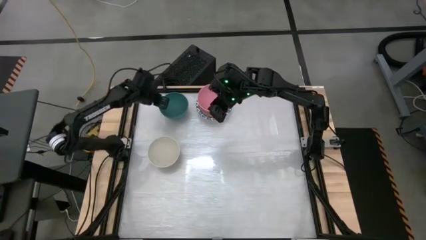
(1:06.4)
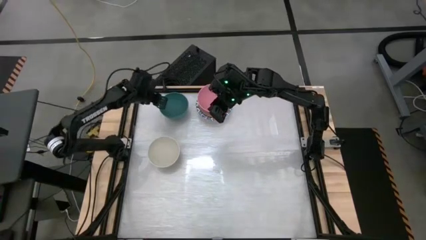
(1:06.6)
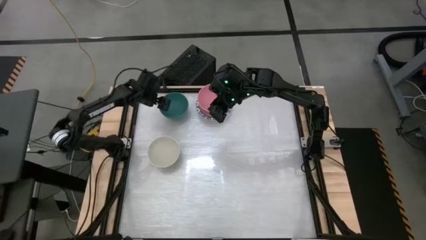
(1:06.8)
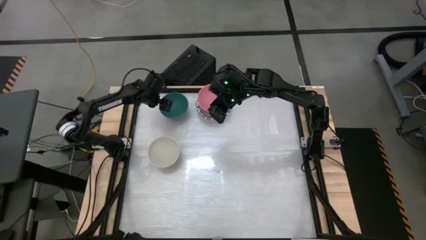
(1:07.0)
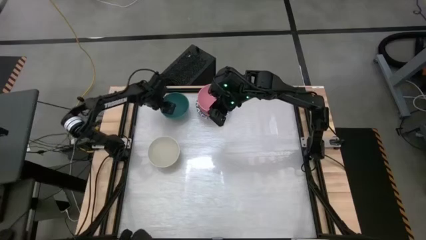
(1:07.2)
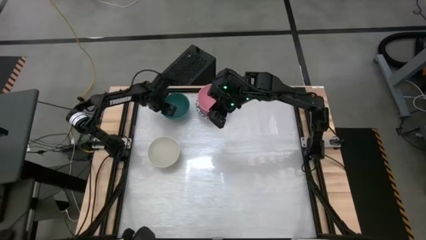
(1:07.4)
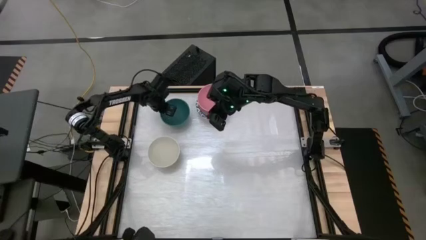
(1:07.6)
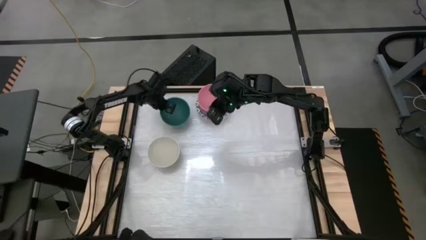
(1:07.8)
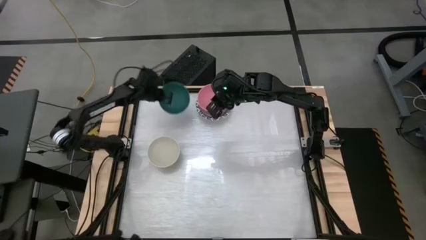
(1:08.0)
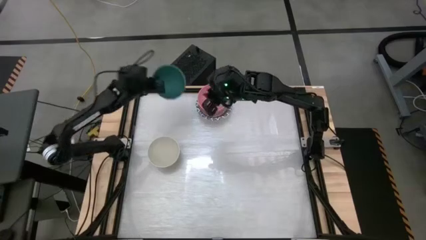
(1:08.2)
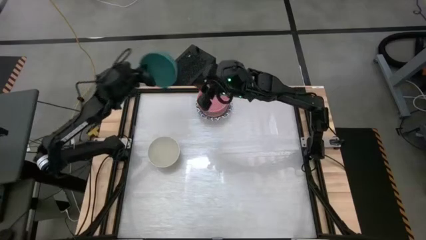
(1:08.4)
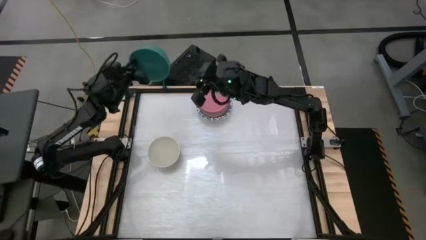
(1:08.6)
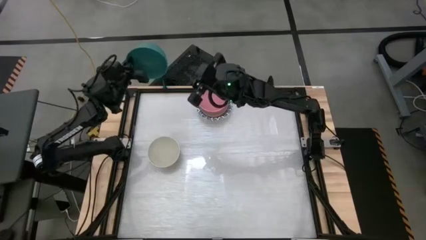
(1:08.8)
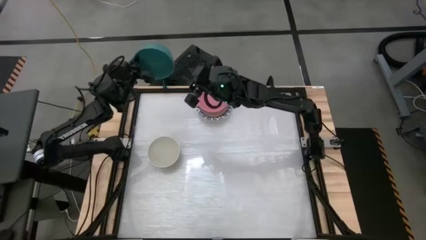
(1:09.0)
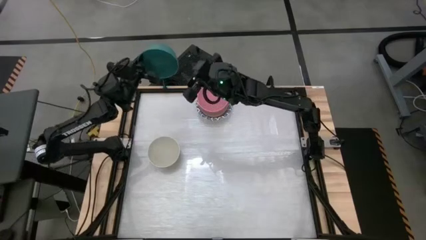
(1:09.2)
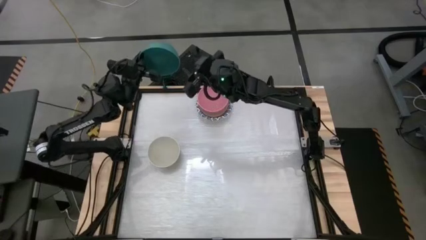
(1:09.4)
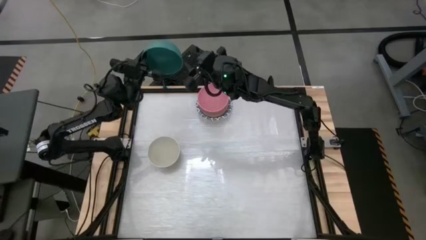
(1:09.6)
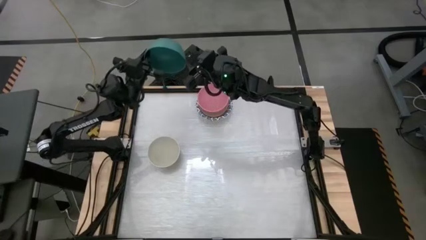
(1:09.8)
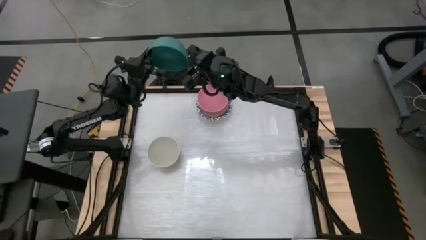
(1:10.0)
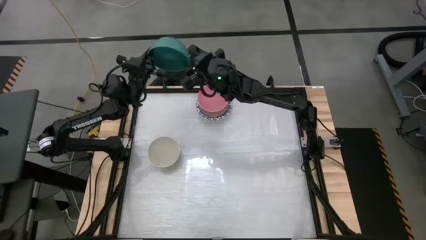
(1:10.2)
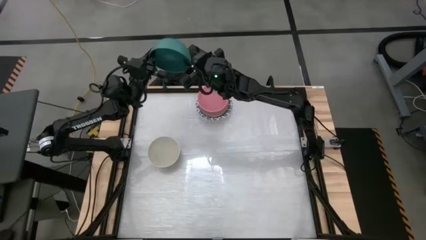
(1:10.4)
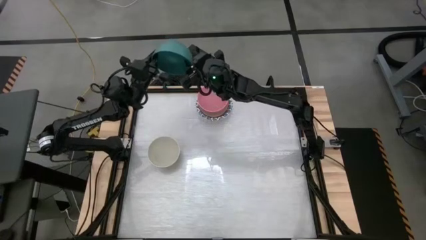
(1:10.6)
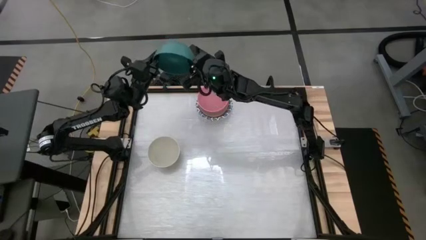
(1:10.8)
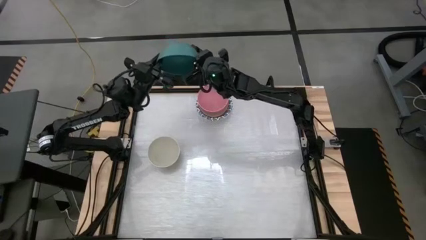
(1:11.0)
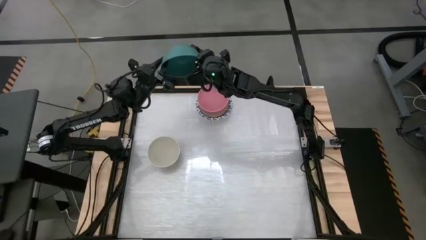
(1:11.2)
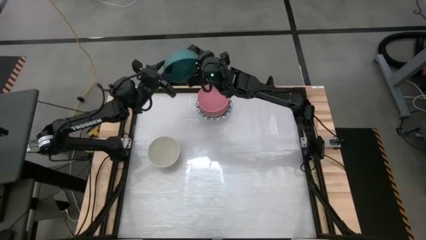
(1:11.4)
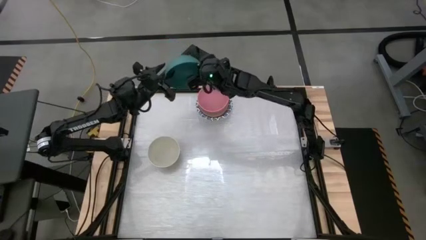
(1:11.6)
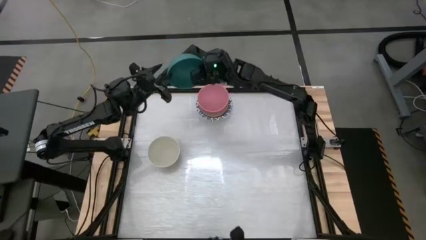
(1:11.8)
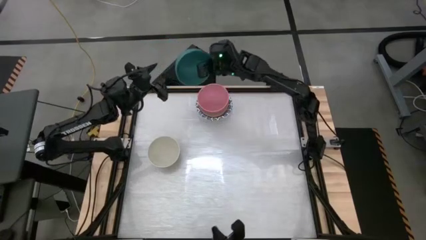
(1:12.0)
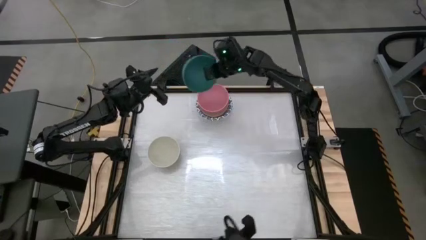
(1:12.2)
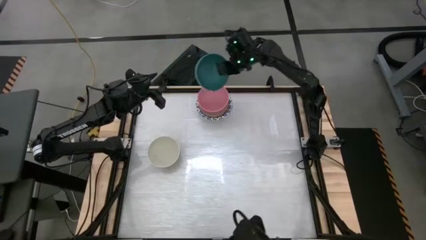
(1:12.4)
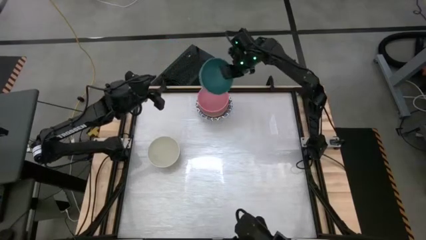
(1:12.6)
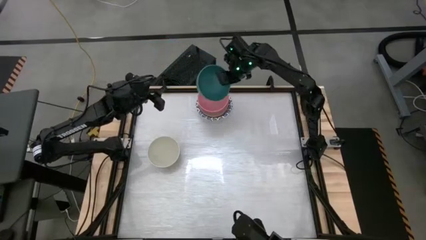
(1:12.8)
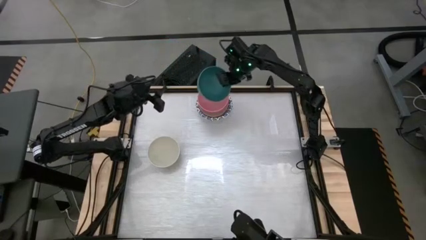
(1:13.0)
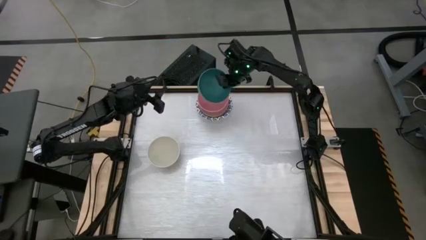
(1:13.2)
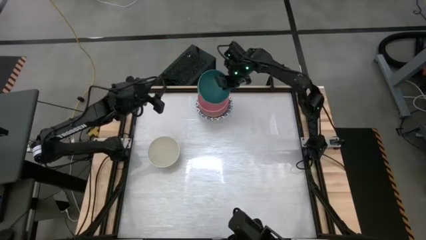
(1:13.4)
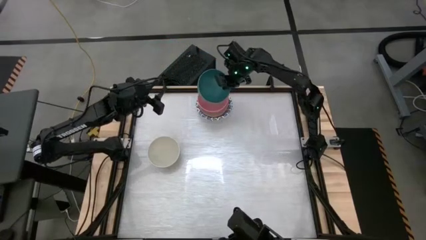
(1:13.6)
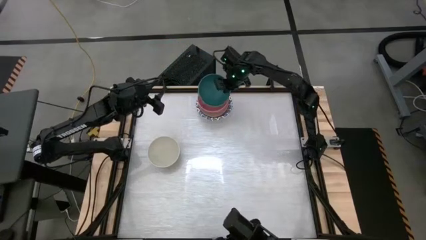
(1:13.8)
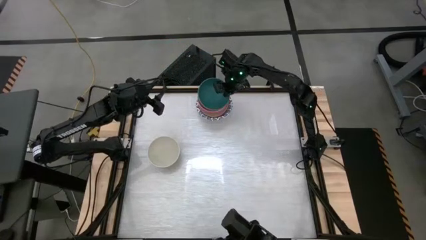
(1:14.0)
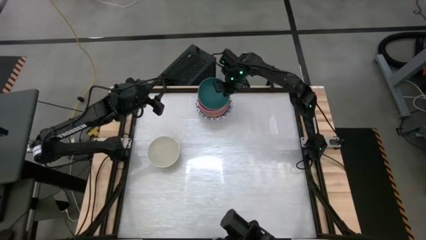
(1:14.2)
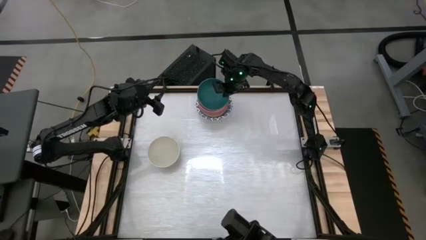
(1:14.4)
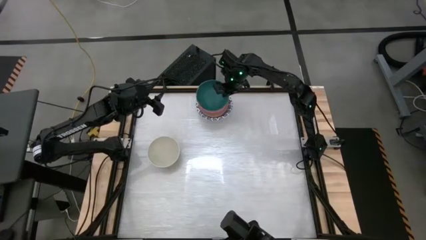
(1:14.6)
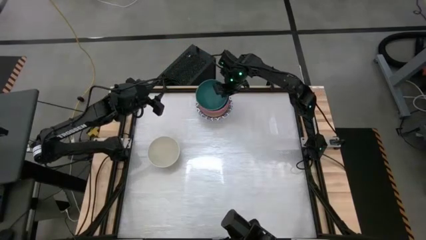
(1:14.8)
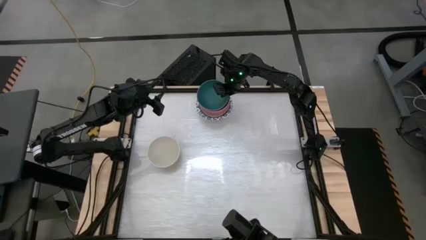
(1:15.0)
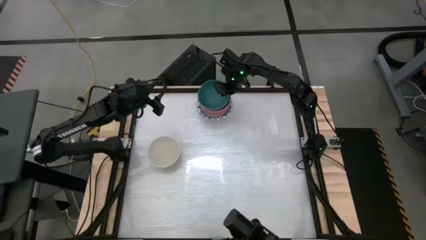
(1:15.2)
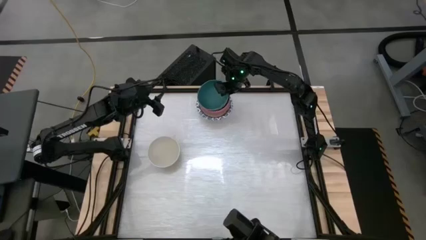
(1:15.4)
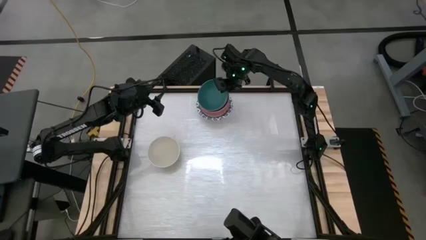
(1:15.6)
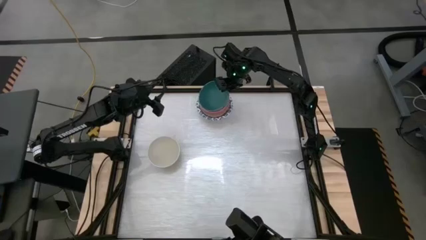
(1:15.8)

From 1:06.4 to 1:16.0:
Task: Nest bowls inside each other by size order
Stack the dark green bowl on top of the pink bowl

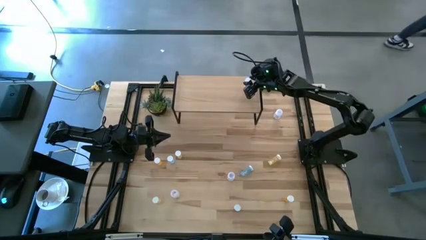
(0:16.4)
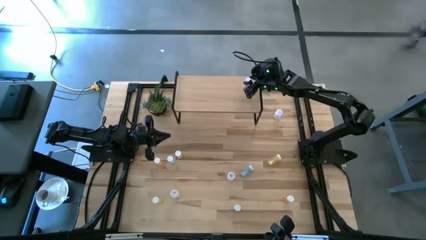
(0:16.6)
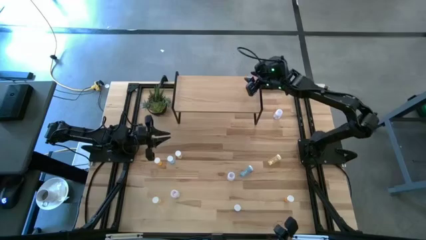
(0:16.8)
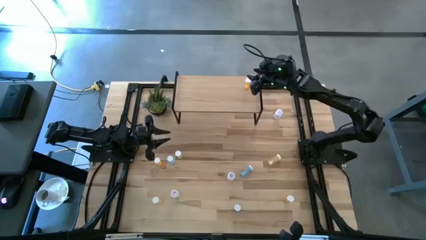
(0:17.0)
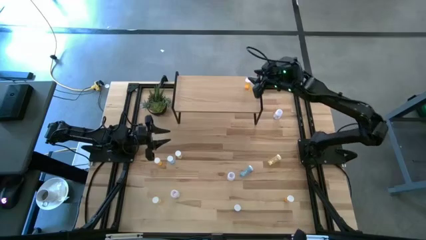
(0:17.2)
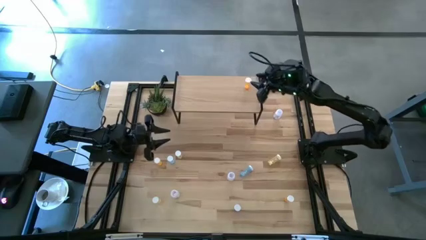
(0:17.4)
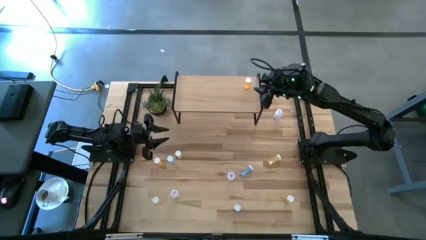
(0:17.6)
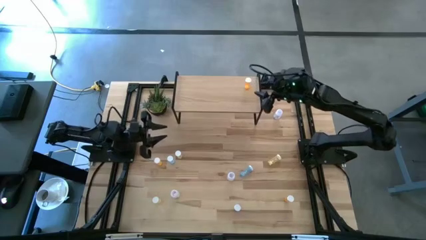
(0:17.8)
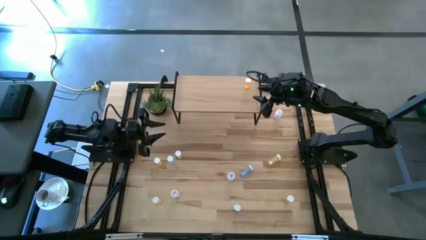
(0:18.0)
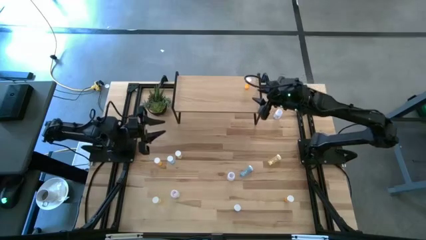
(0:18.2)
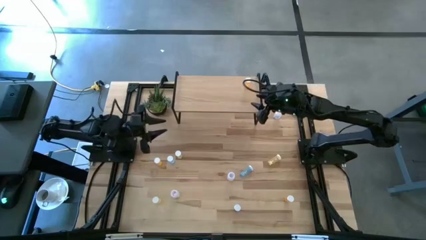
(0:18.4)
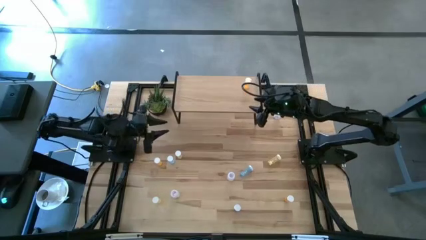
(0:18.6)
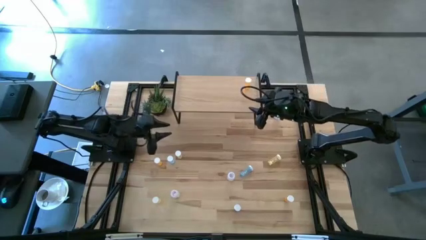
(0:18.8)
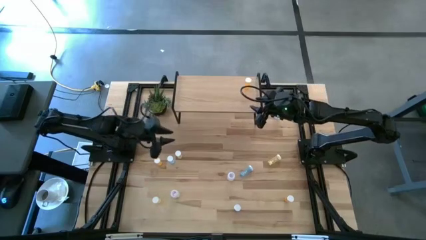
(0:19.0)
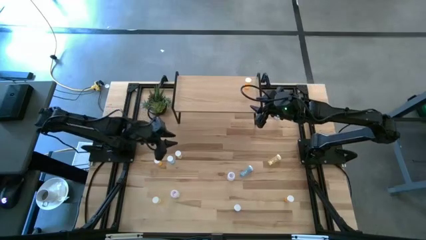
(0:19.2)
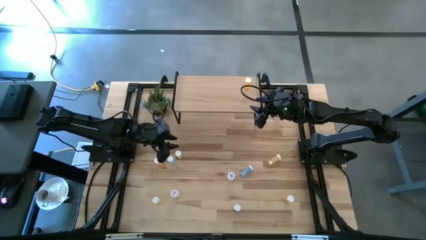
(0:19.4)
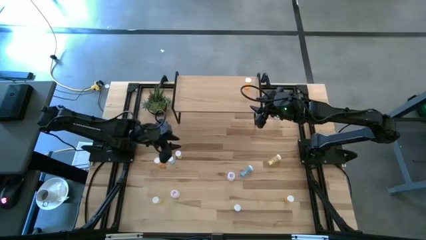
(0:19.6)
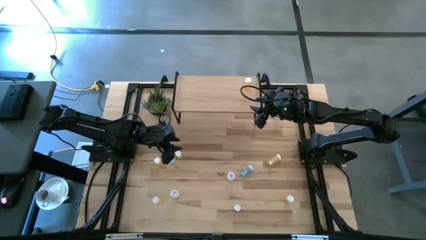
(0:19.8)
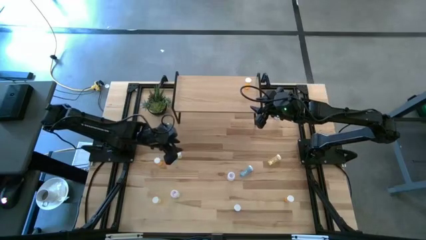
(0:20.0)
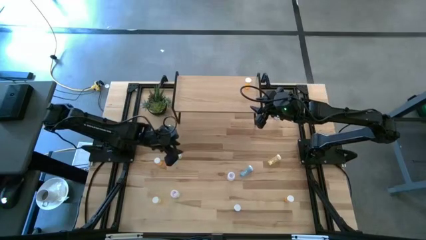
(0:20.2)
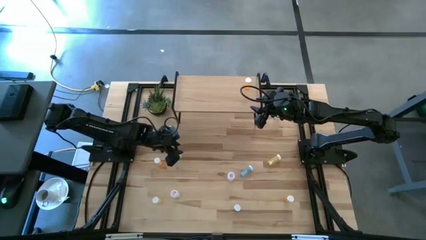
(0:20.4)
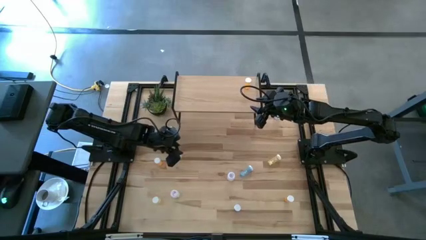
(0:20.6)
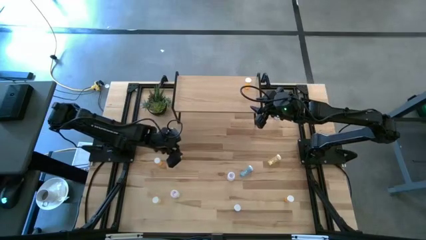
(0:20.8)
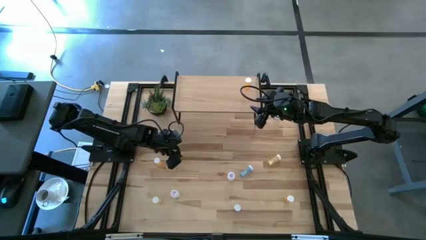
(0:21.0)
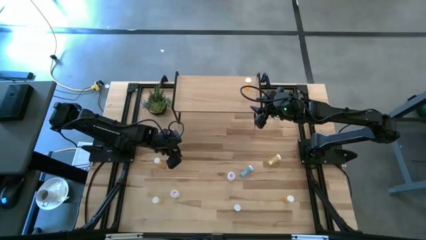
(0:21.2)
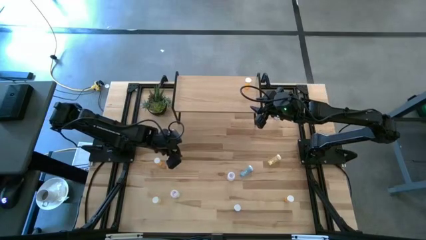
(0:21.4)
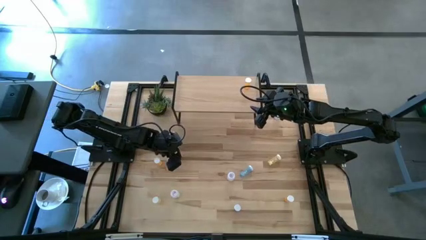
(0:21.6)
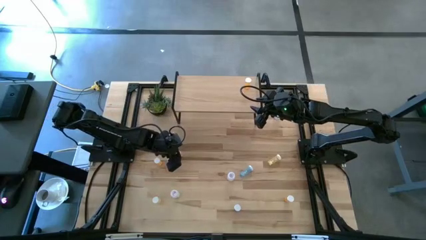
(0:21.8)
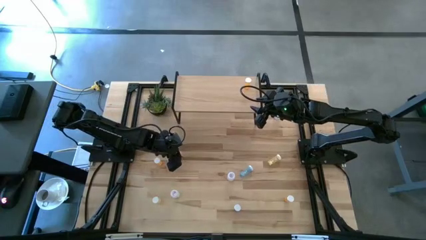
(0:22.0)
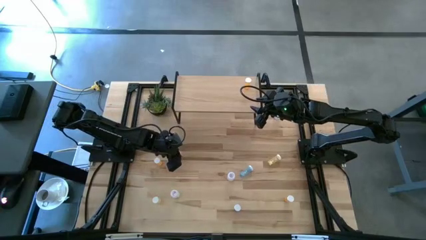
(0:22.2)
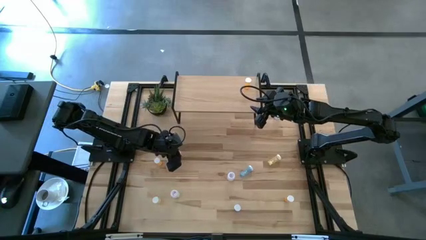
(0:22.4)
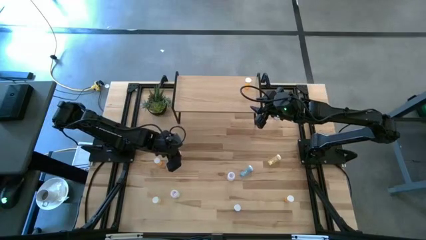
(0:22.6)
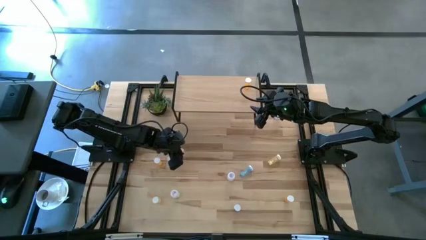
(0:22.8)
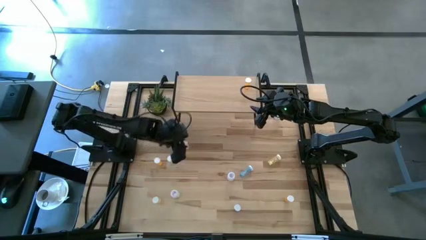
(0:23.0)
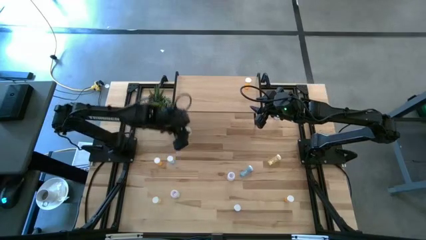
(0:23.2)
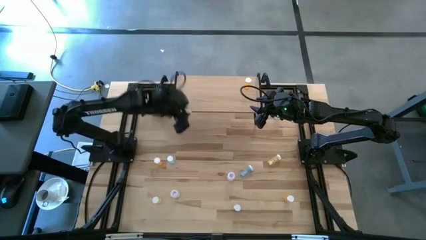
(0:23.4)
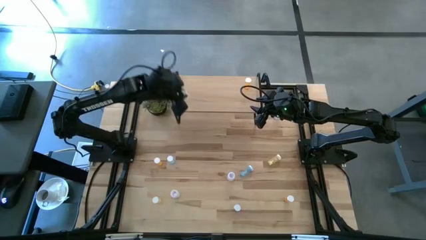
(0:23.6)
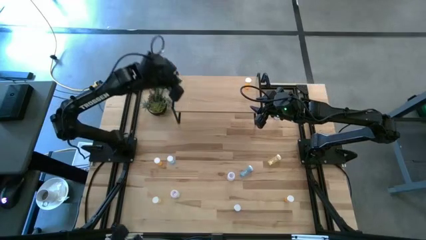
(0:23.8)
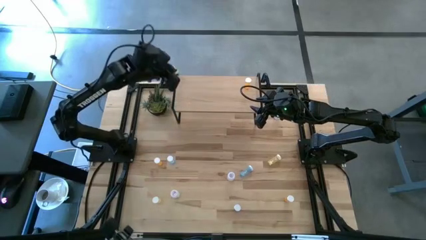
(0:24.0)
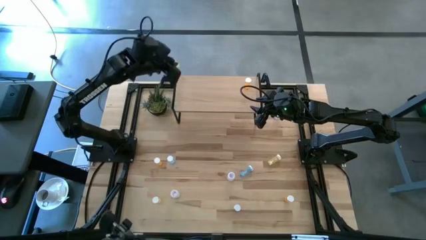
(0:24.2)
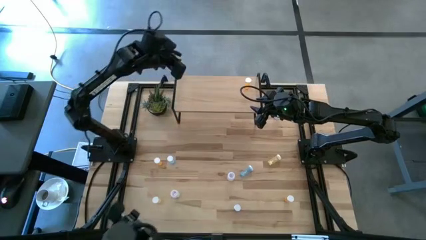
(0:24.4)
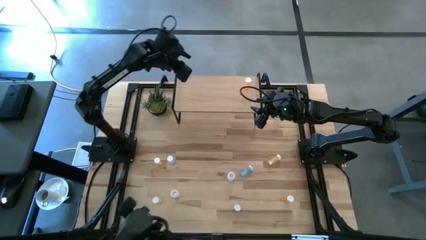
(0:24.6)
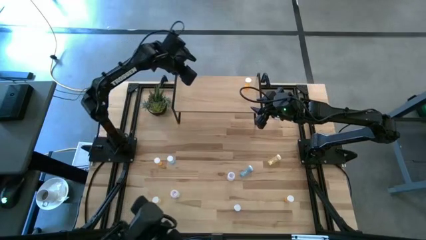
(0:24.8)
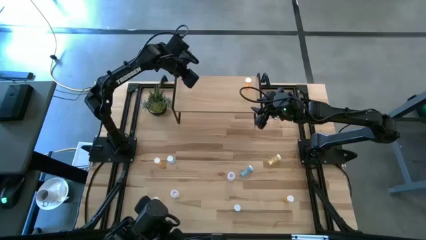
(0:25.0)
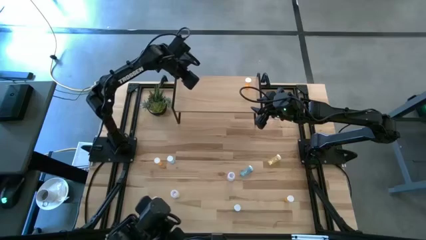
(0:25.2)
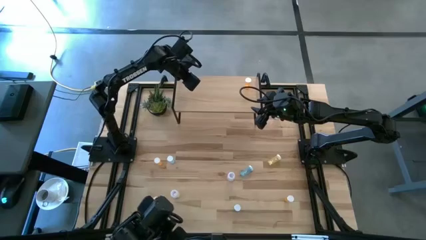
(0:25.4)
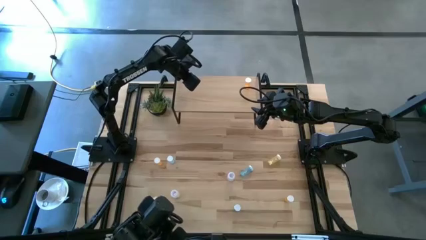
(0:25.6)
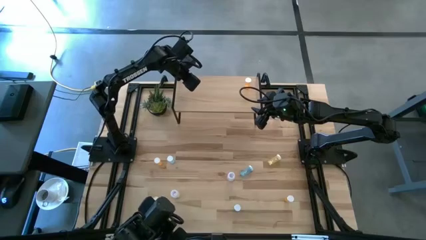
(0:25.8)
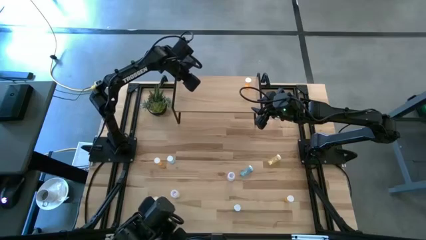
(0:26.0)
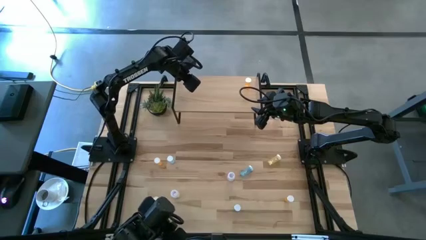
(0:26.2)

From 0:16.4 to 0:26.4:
Task: Pick and place medicine bottles onto shelf by color
Put the top left yellow pill bottle on the shelf
